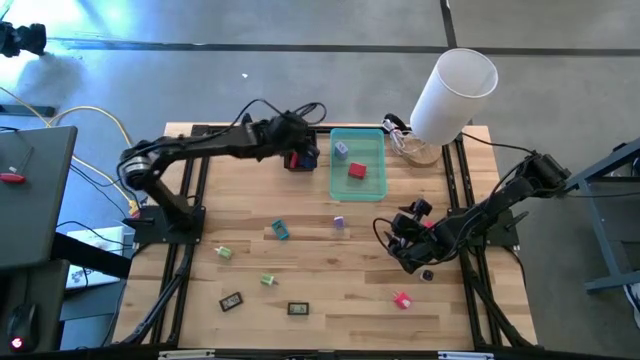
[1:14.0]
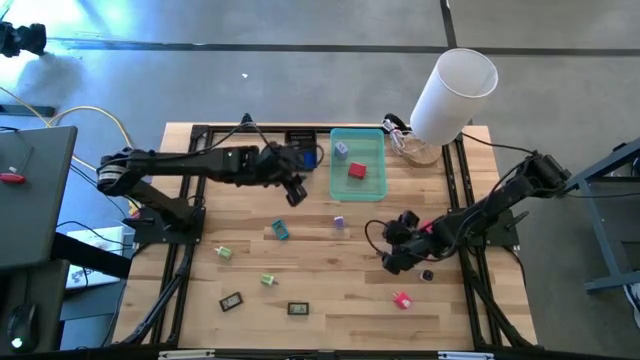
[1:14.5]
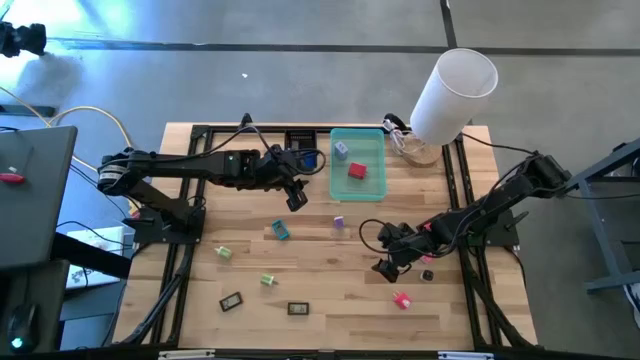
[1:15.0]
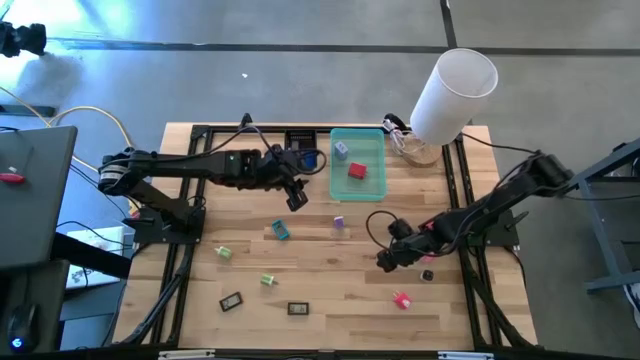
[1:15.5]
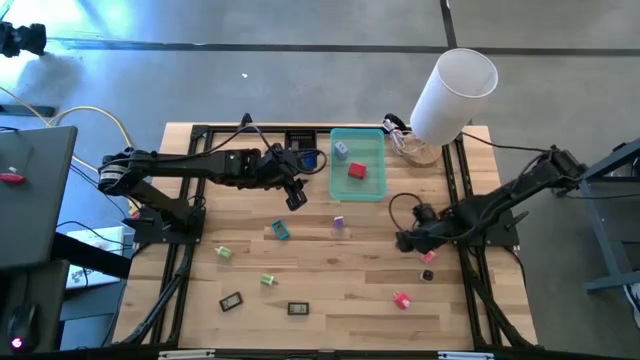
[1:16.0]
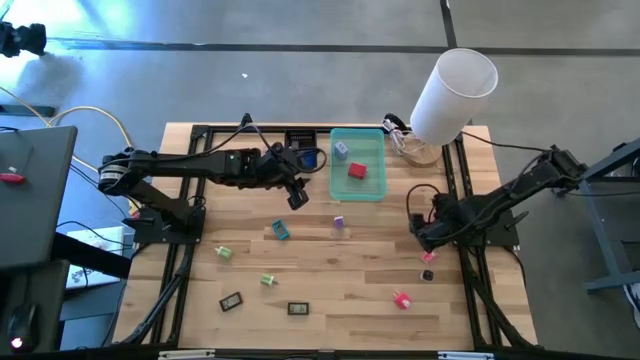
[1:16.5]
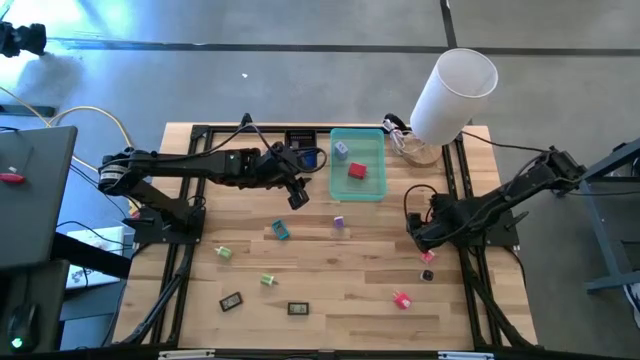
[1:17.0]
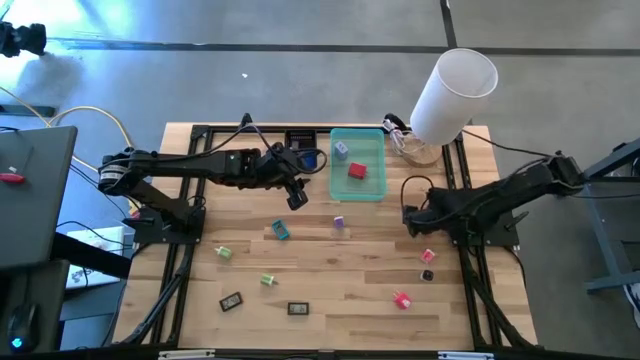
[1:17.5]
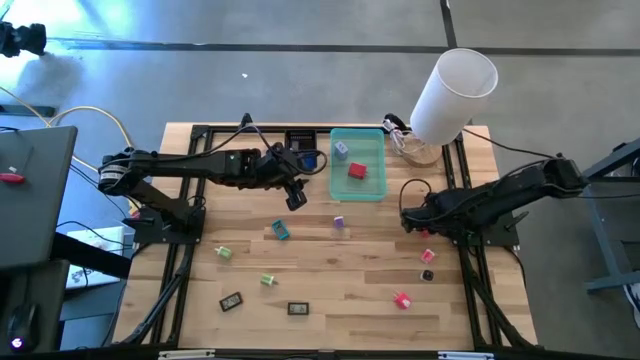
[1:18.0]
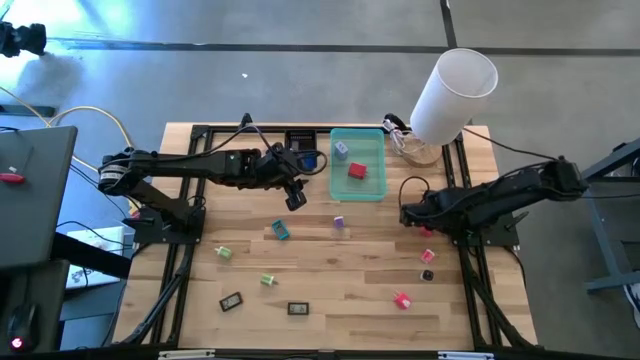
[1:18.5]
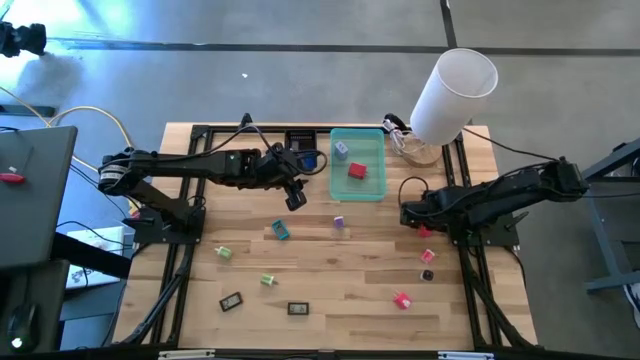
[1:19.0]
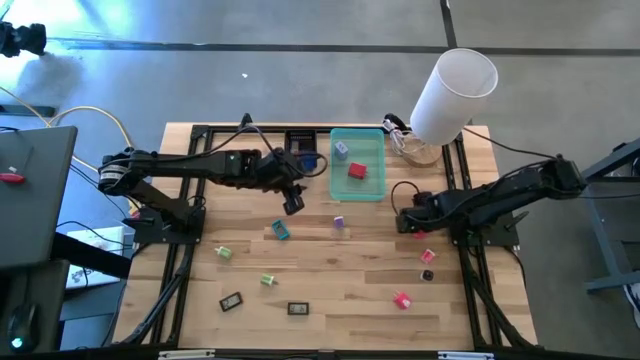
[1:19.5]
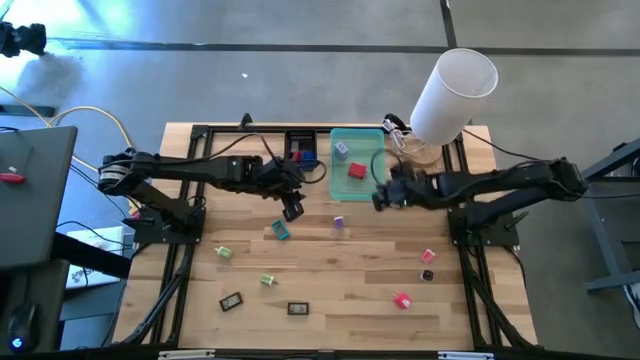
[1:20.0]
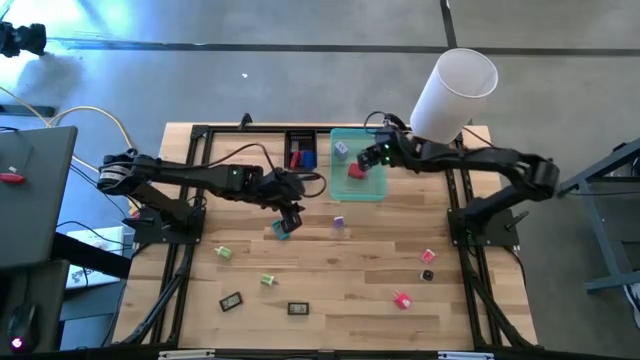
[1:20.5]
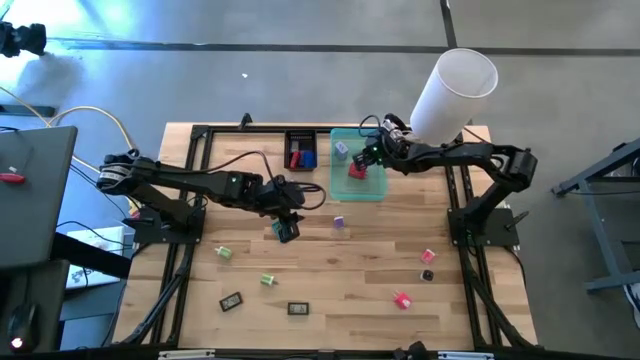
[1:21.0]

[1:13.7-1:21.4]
Task: Pick & Place Office items
Put the top pink charger adapter into the blue bin

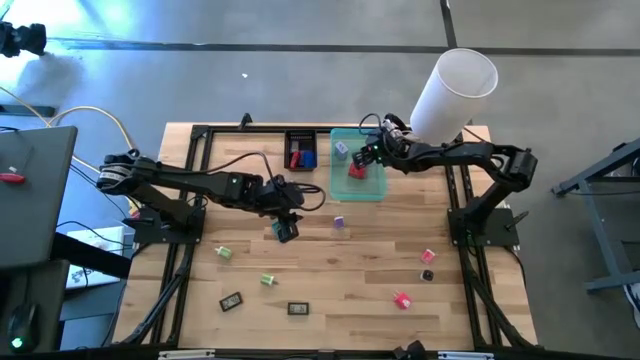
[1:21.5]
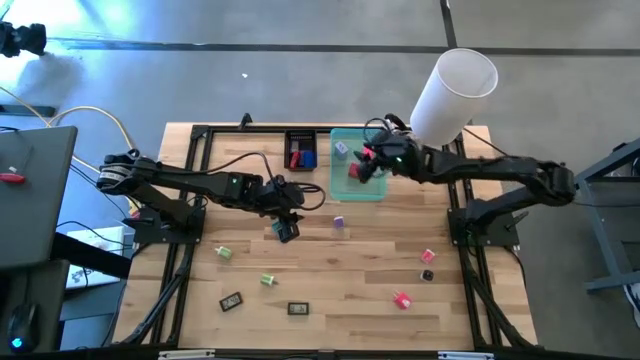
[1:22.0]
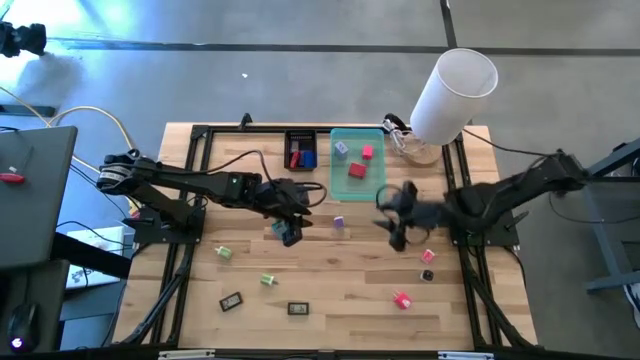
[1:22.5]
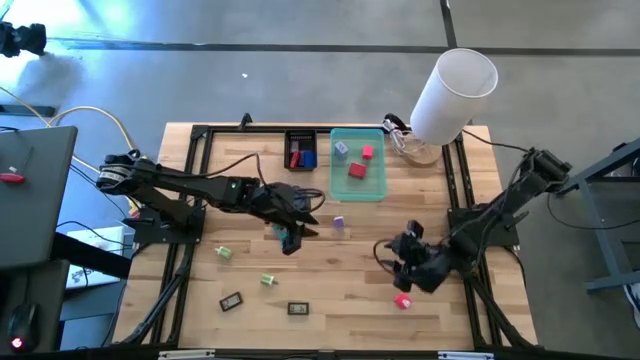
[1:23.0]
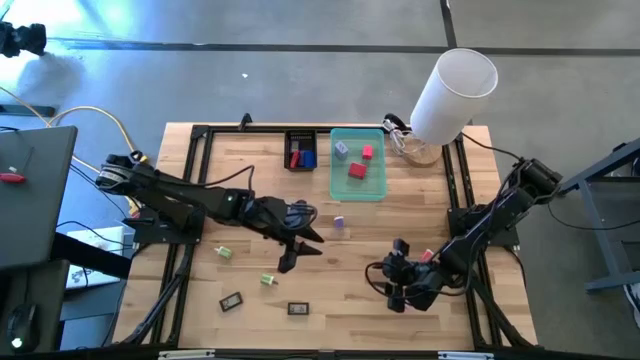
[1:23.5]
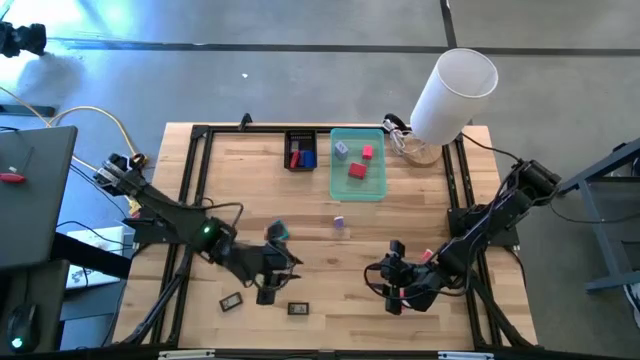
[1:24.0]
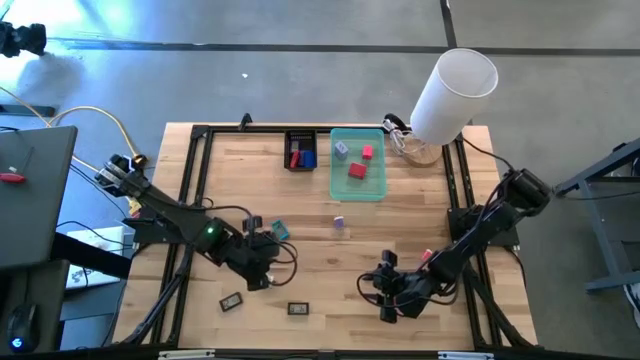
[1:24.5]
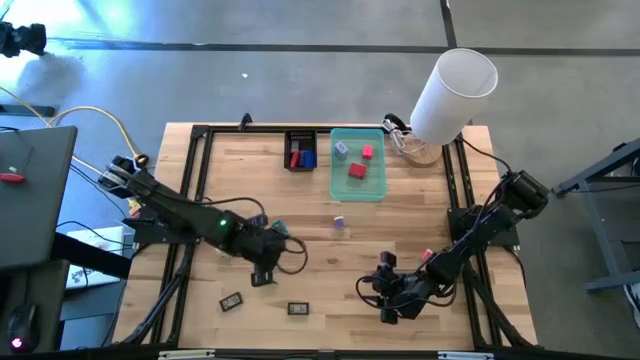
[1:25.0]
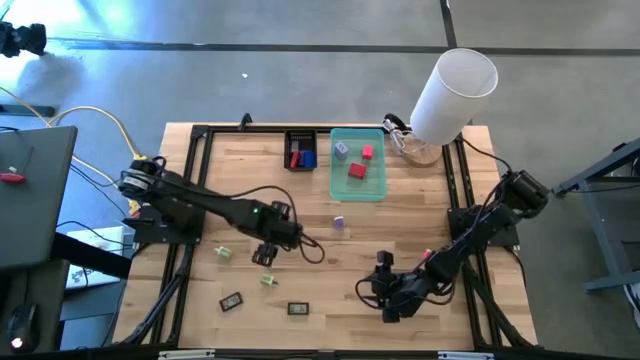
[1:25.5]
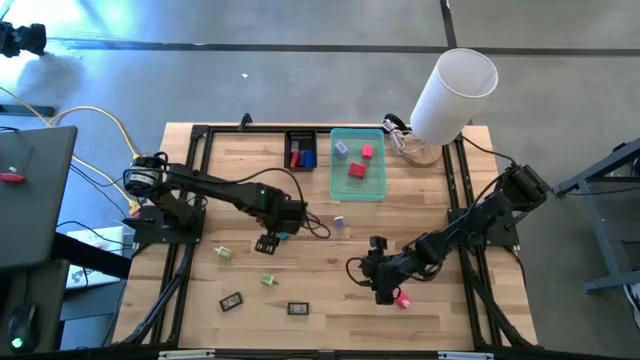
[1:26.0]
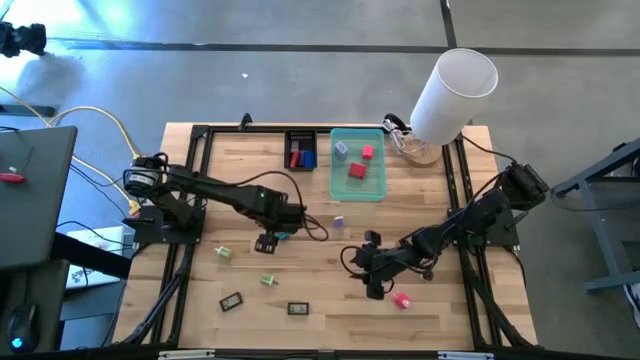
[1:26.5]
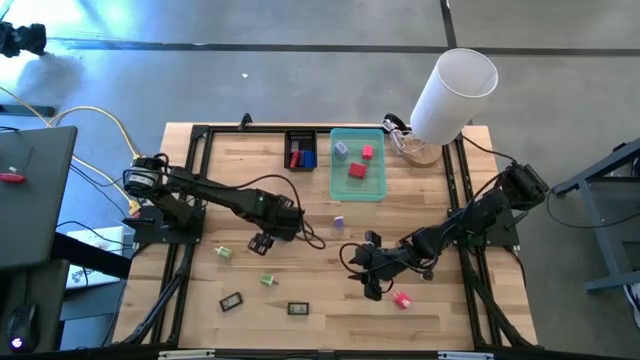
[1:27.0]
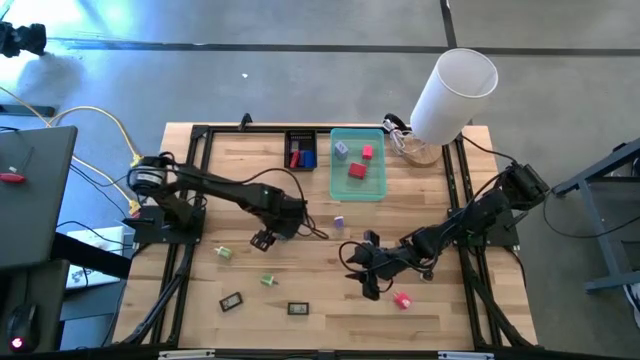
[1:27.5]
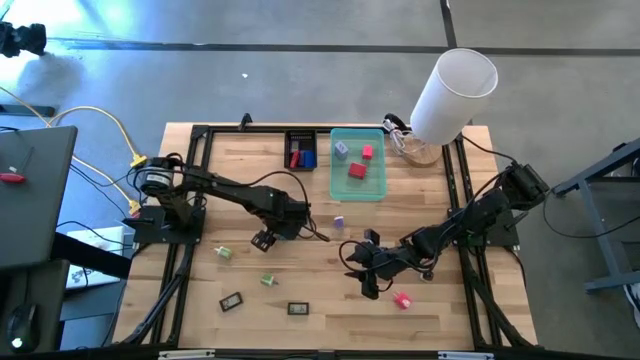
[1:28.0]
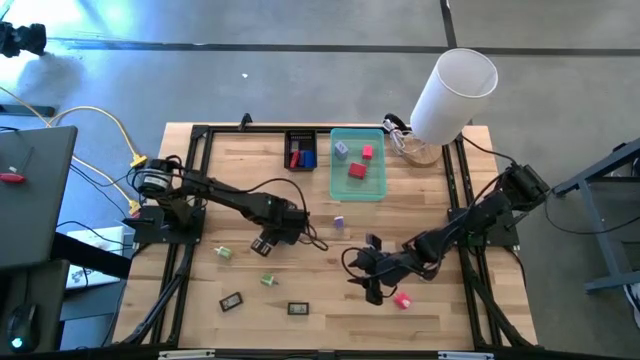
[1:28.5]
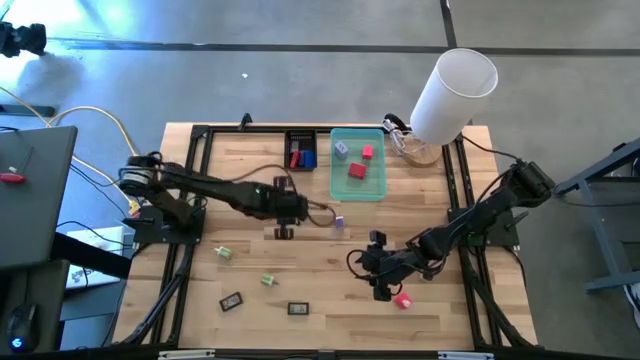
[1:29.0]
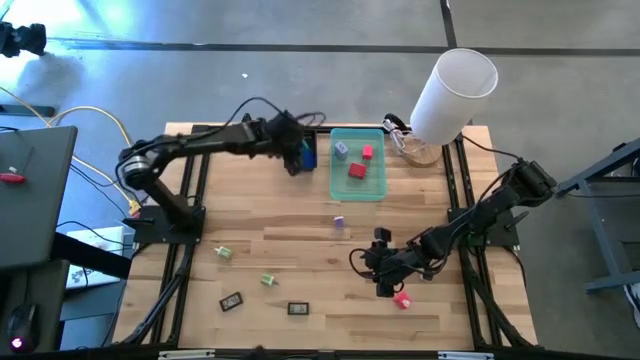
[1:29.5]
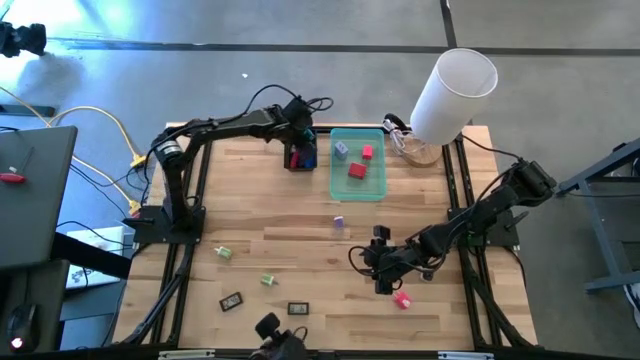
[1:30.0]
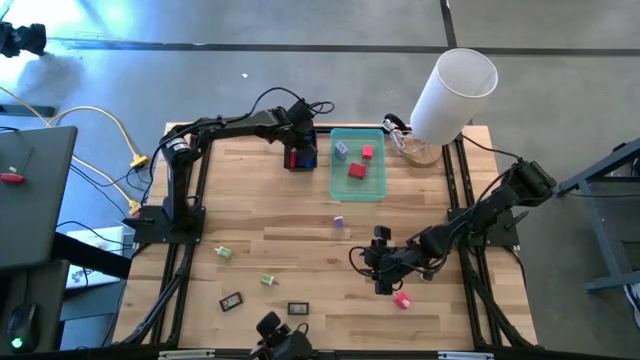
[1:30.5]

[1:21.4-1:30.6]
Put the blue digital timer into the black bin

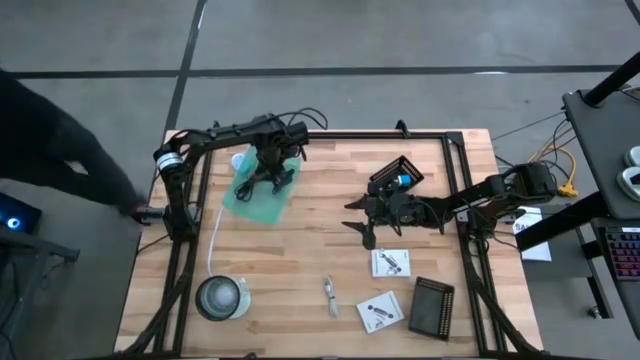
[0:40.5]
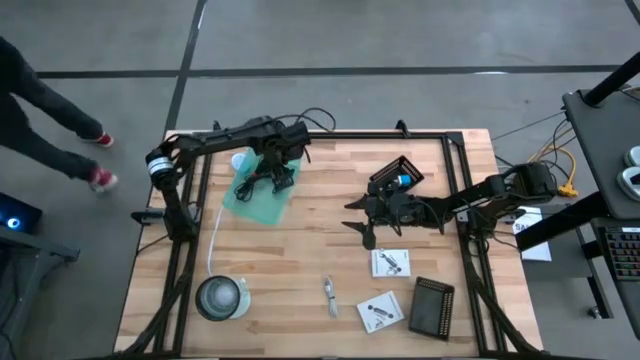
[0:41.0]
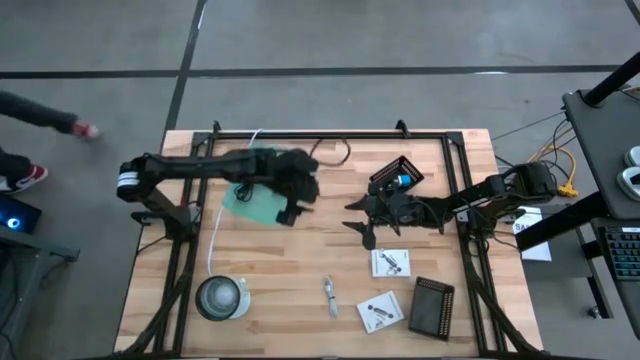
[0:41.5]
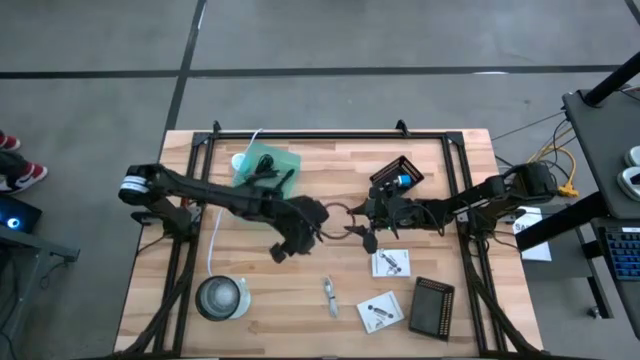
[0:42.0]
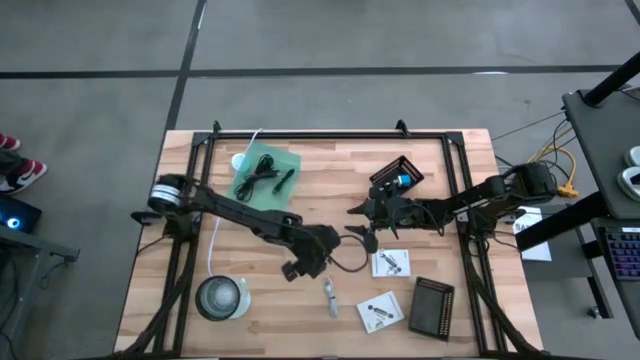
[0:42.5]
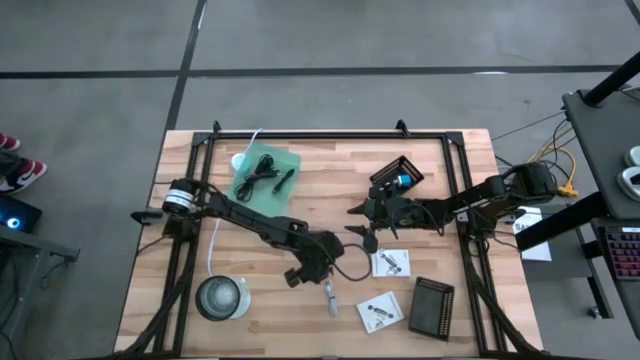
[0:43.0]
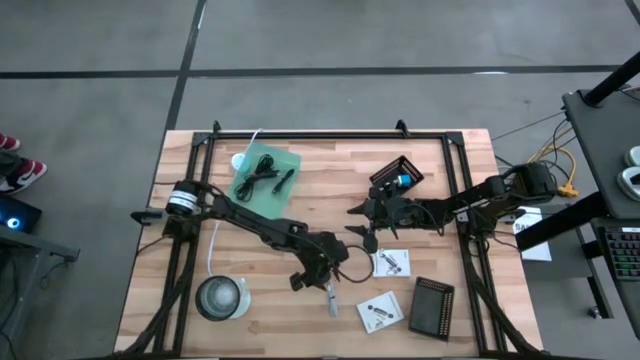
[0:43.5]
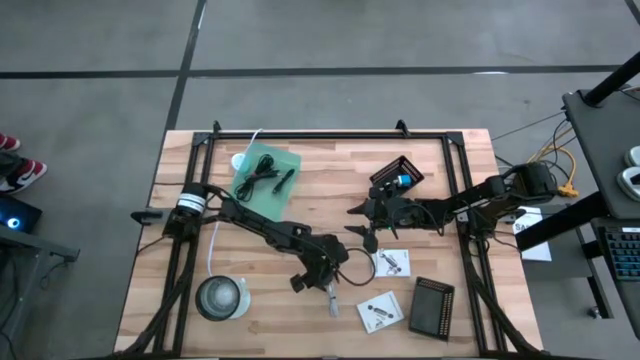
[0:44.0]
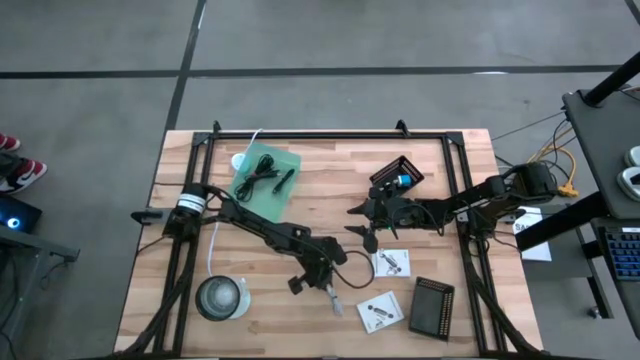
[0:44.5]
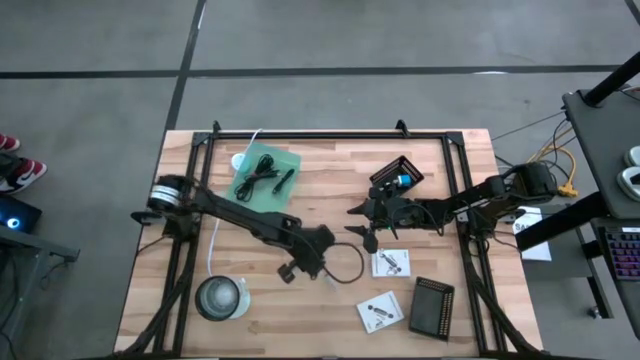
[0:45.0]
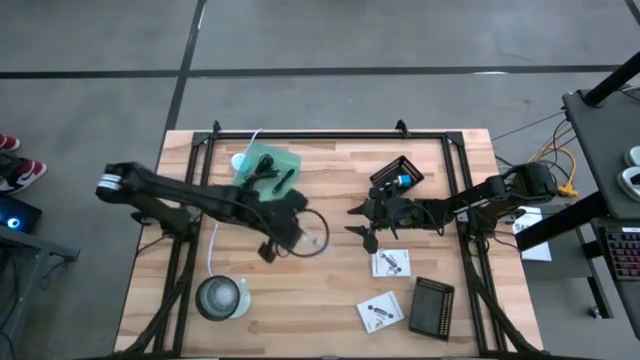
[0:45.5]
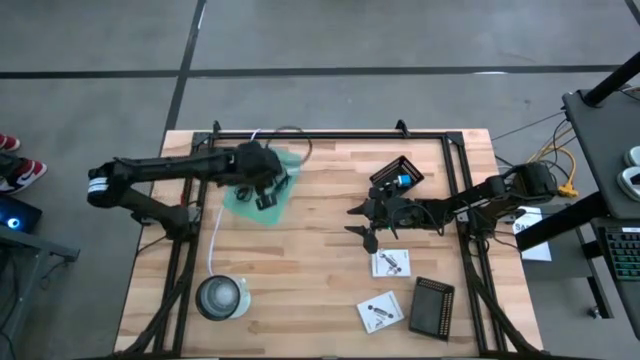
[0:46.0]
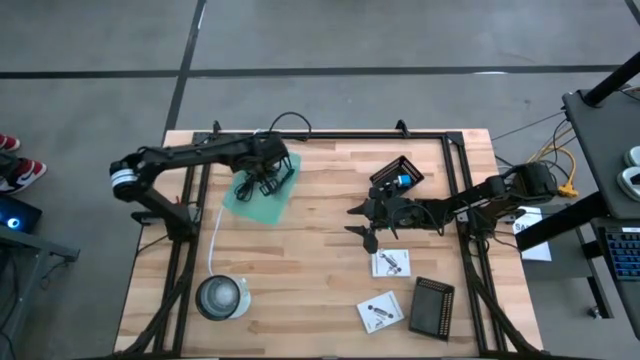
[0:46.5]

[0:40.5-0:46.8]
Task: Pick and place items into bin
Put the white charger cable into the light blue bin
